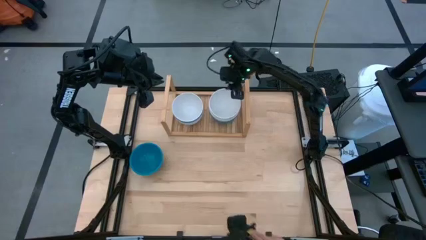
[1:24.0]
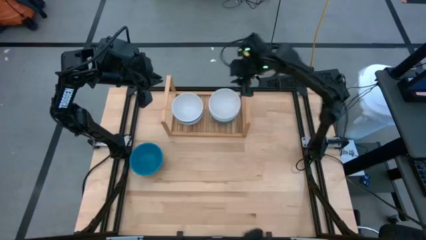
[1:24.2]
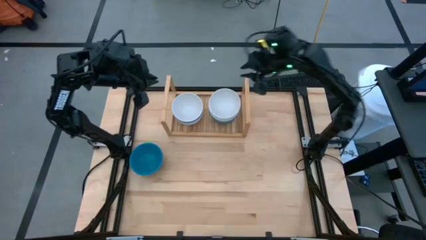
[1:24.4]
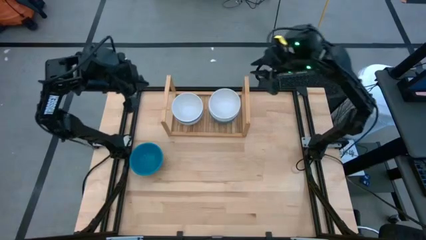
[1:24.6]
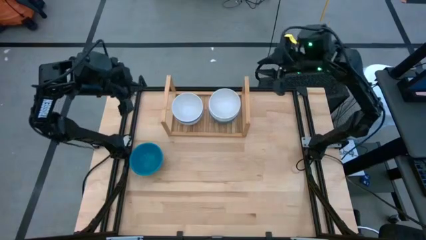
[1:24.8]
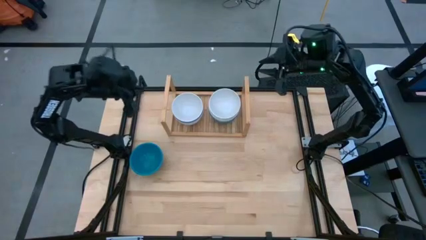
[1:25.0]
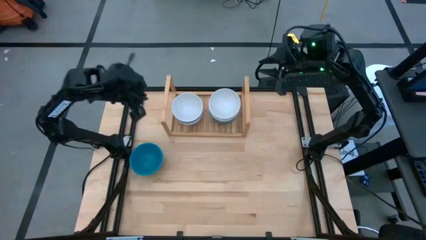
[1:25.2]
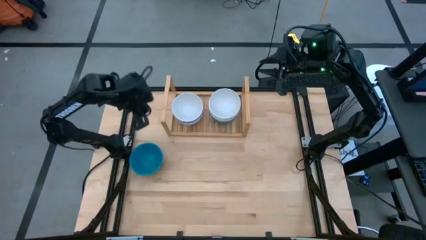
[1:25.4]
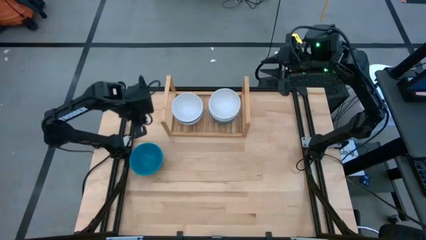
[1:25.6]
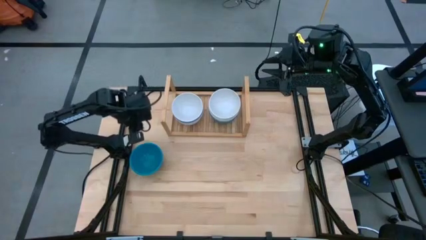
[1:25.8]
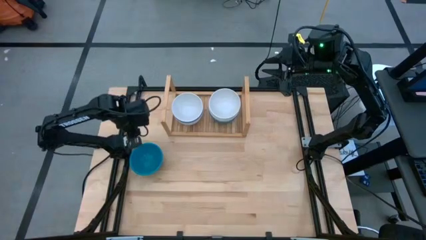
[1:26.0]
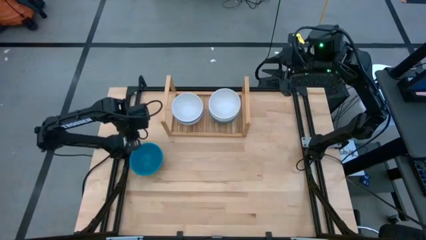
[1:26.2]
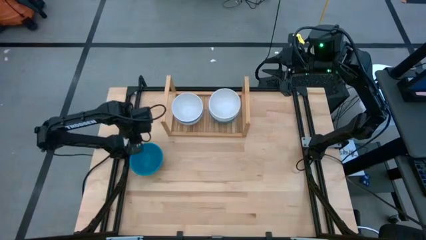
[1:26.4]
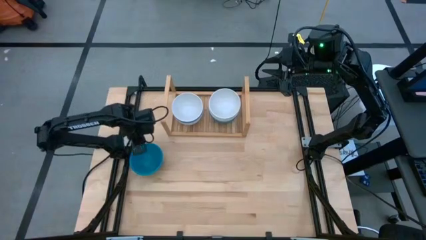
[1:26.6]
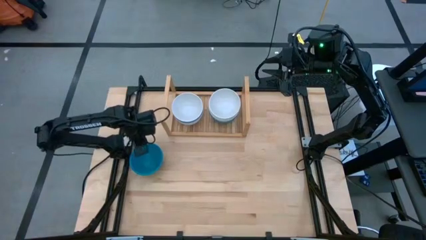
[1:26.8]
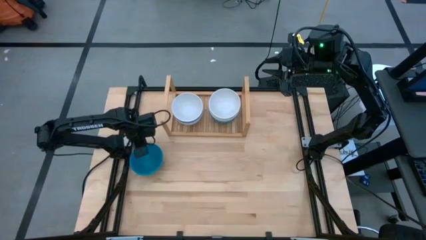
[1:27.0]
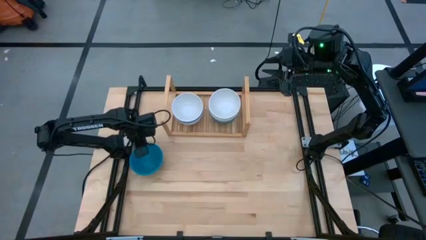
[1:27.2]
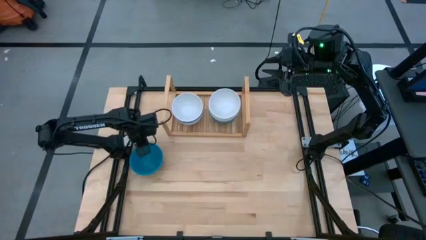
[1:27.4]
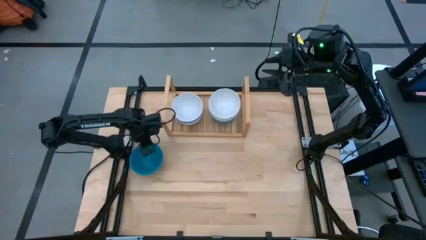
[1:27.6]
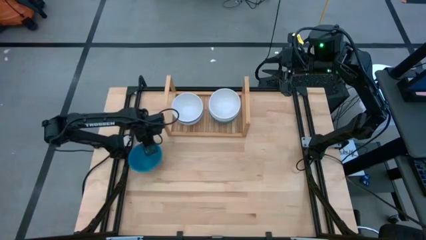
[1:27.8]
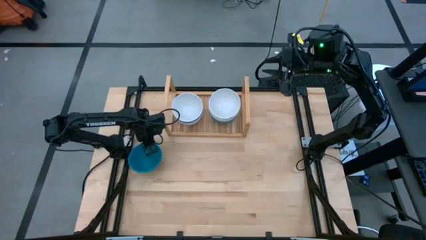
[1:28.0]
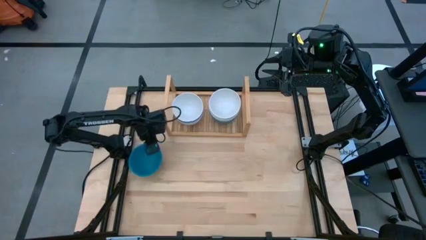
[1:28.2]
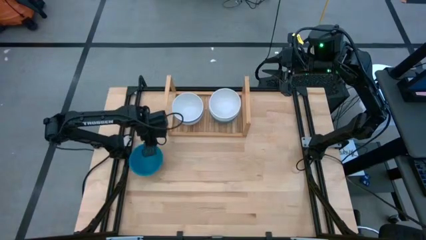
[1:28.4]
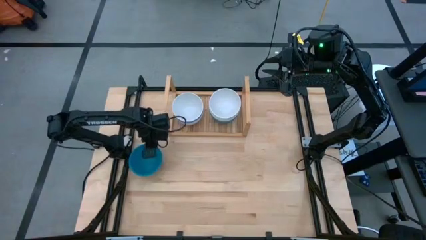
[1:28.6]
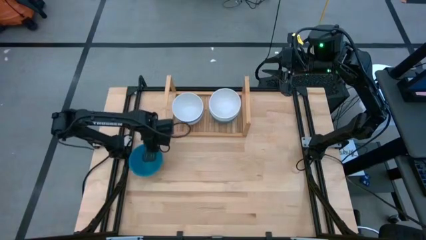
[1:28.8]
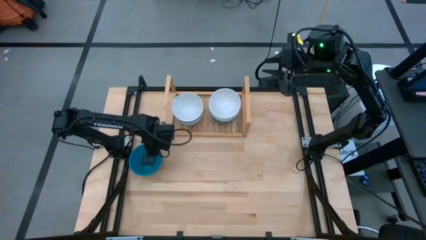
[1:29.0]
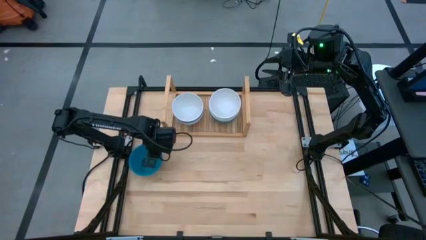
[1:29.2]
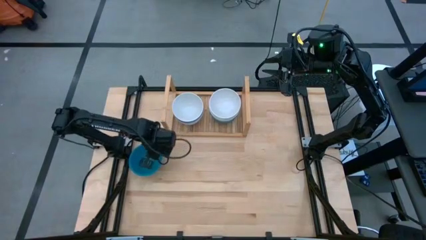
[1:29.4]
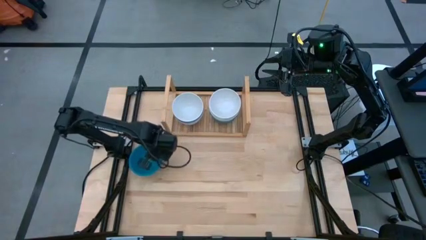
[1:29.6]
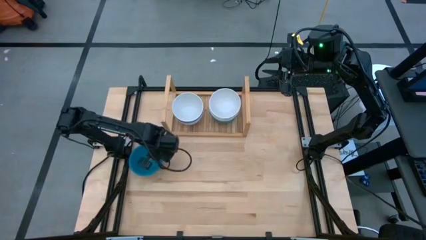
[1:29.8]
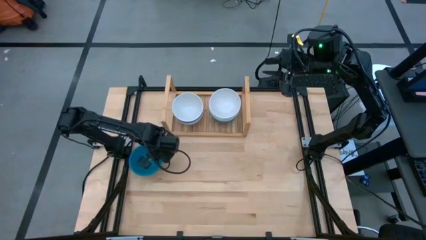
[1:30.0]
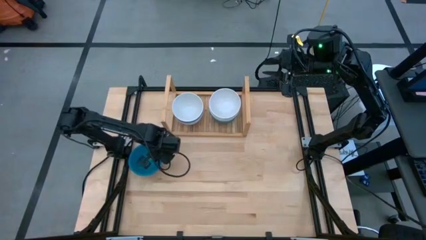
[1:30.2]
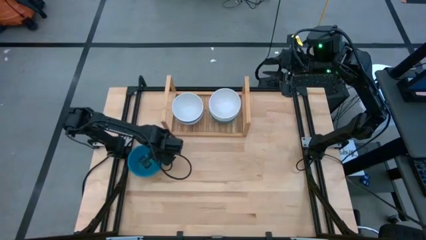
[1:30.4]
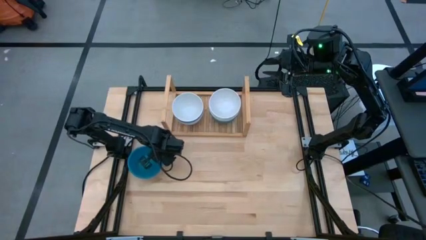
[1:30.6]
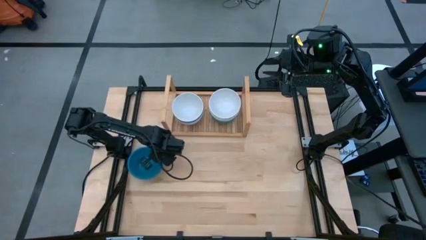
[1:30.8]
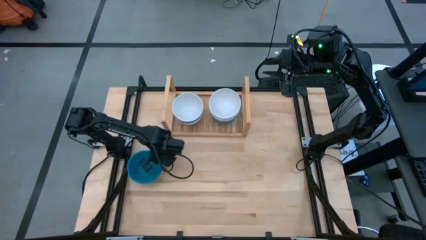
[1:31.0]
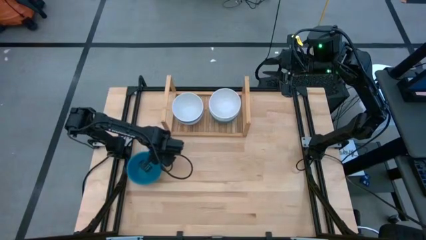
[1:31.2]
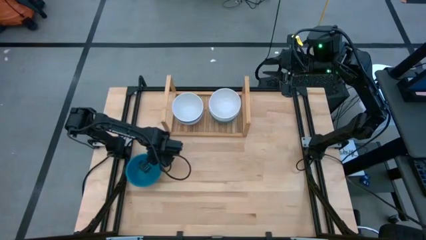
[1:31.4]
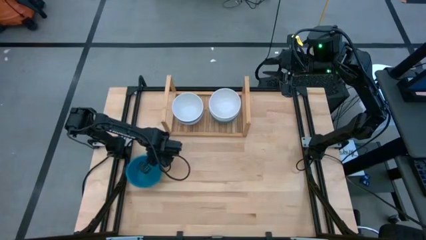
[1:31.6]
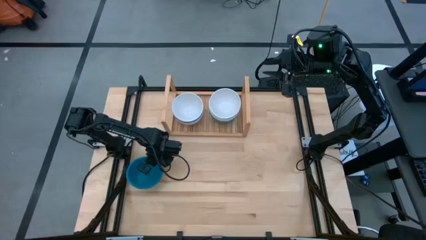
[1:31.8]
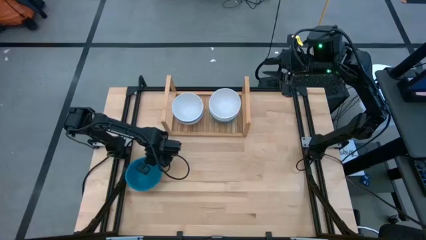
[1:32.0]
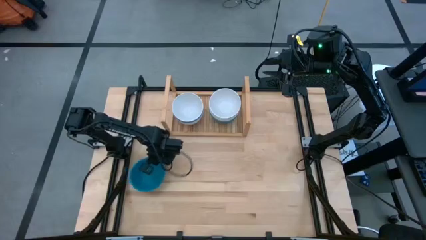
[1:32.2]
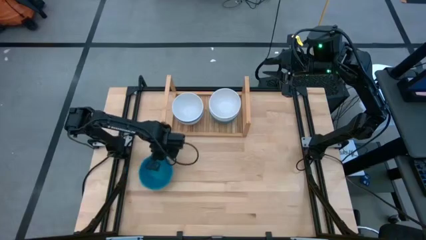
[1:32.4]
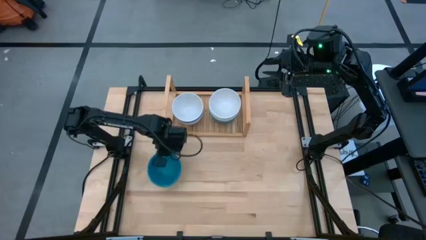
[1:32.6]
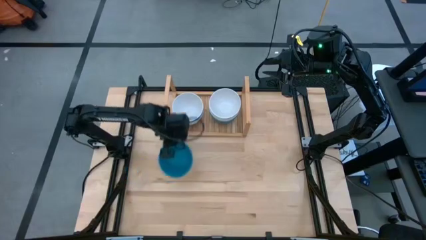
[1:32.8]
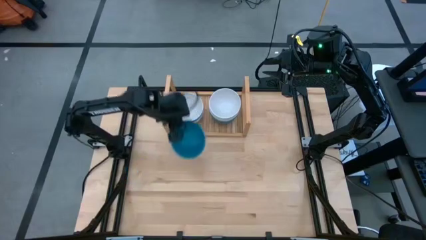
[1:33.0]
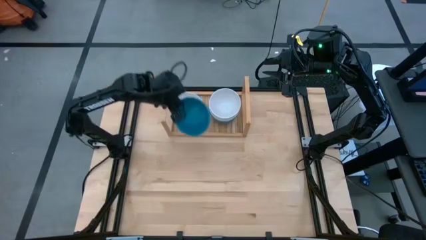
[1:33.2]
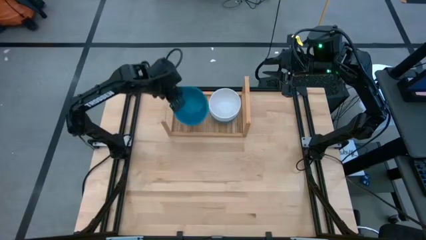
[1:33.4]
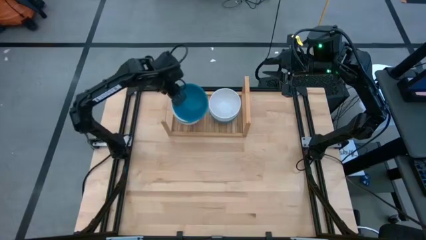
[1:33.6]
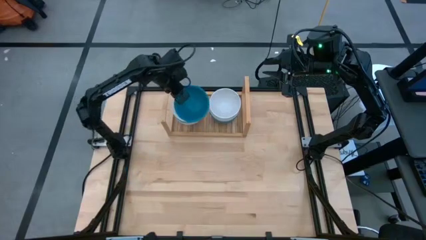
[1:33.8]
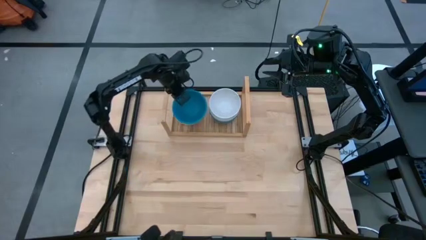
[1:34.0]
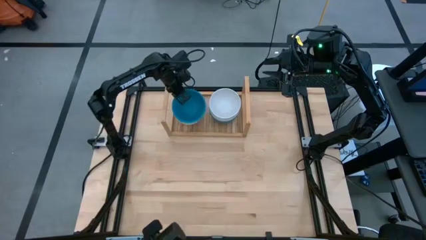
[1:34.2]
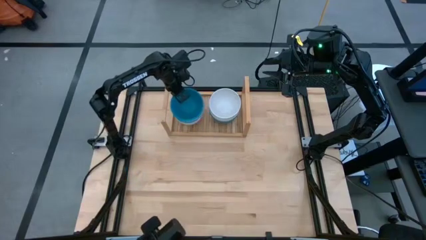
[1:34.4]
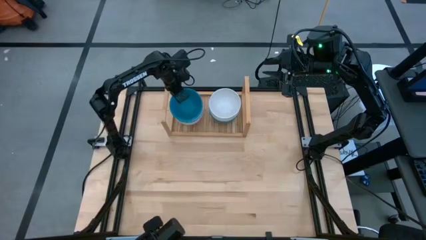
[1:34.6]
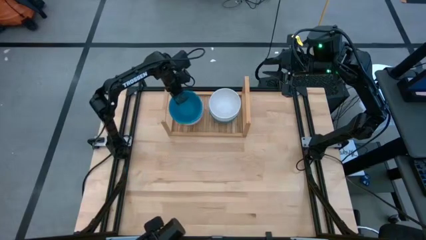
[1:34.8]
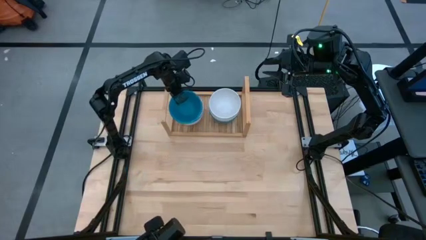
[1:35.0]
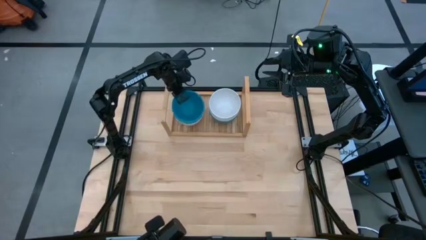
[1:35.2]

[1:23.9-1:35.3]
Task: Place and stack bowls onto a shelf
Stack the blue bowl on the blue bowl on the shelf

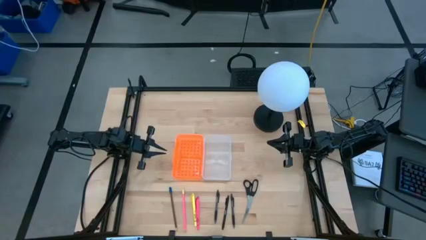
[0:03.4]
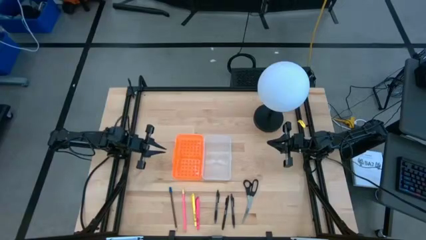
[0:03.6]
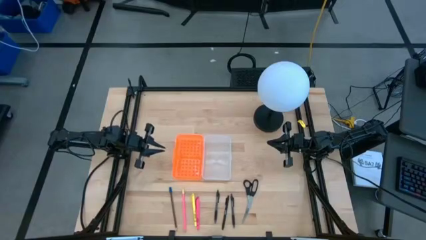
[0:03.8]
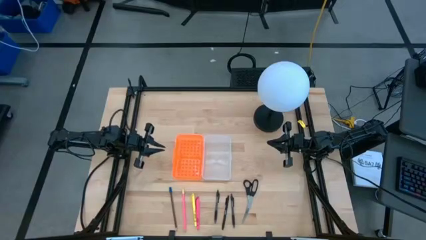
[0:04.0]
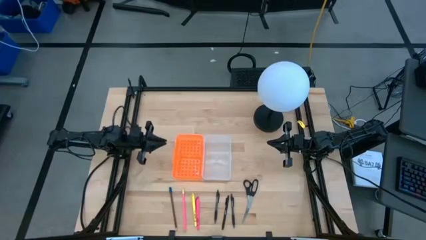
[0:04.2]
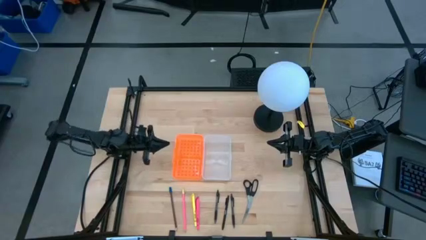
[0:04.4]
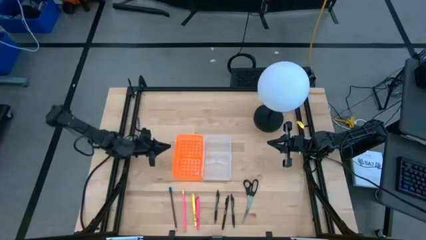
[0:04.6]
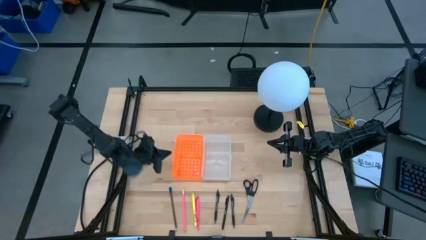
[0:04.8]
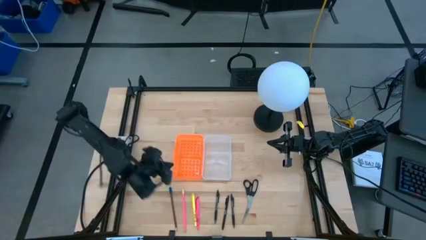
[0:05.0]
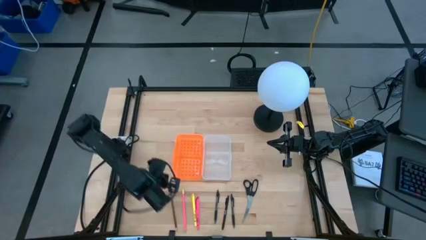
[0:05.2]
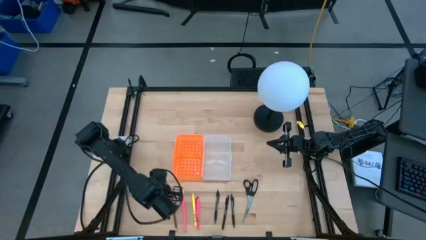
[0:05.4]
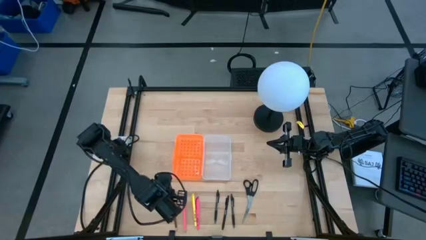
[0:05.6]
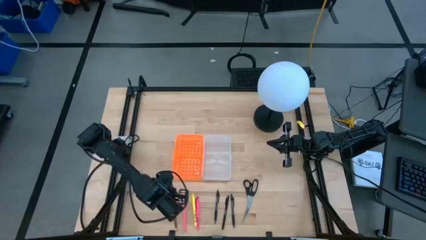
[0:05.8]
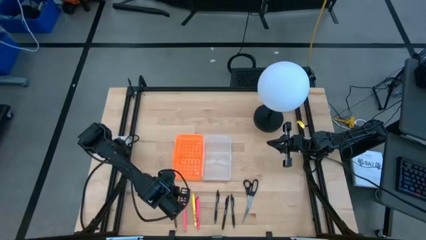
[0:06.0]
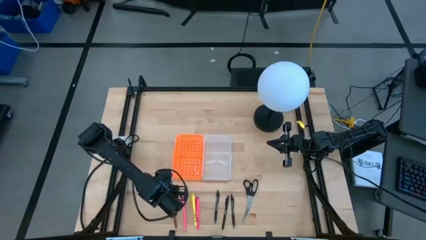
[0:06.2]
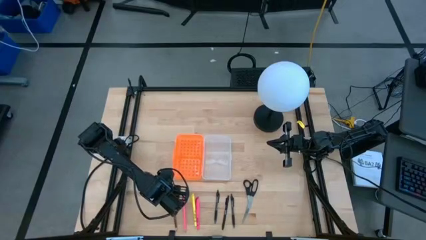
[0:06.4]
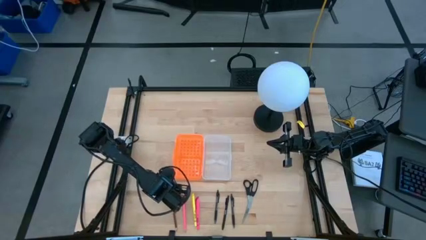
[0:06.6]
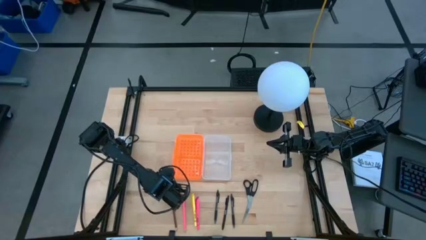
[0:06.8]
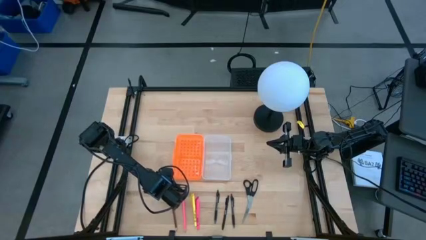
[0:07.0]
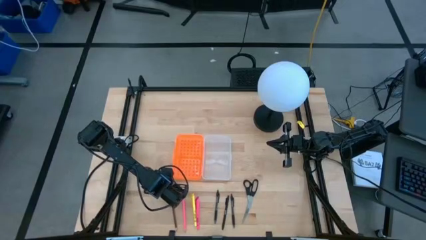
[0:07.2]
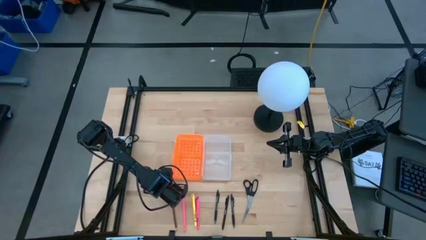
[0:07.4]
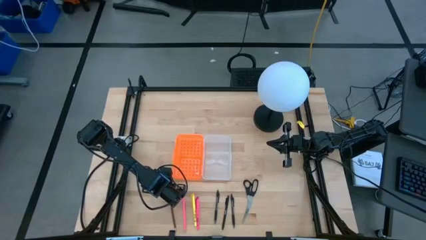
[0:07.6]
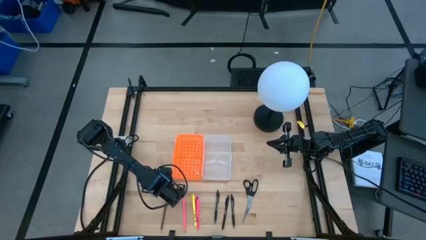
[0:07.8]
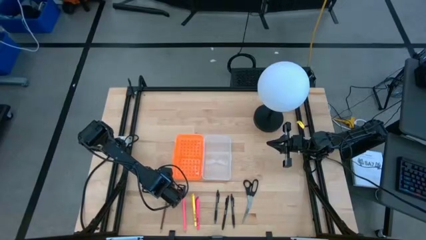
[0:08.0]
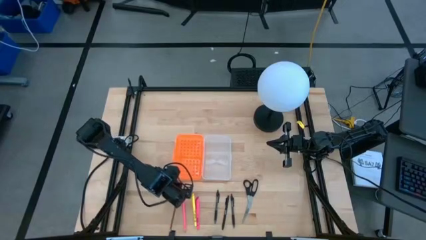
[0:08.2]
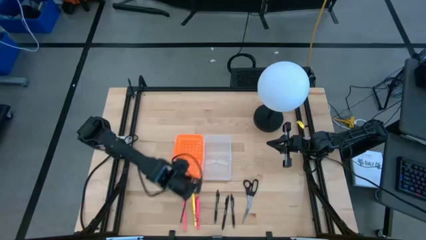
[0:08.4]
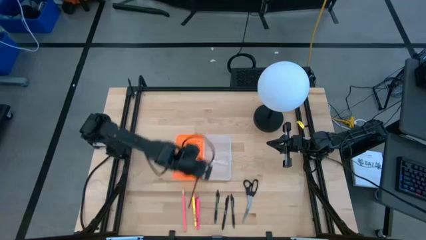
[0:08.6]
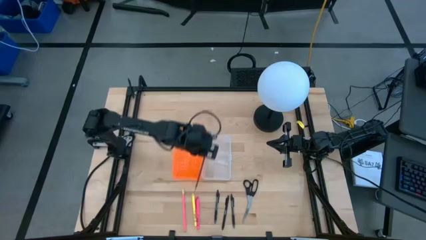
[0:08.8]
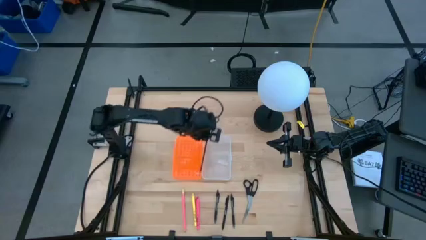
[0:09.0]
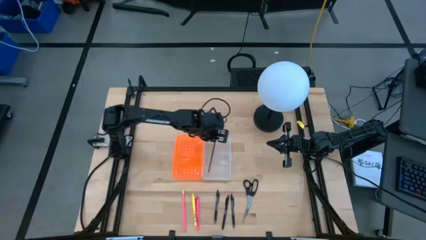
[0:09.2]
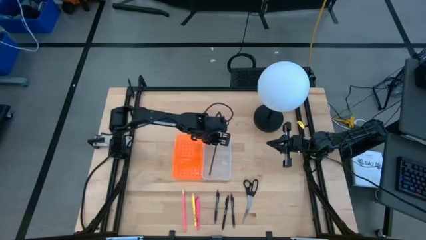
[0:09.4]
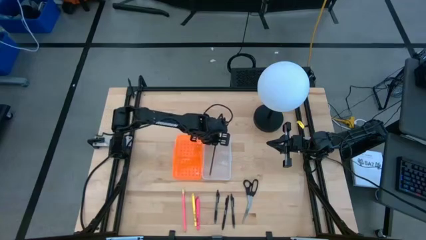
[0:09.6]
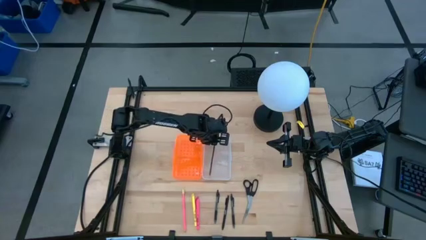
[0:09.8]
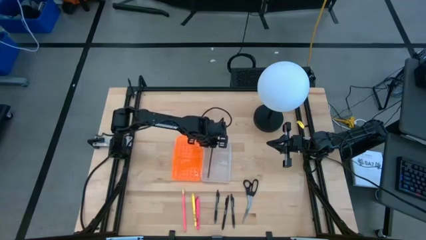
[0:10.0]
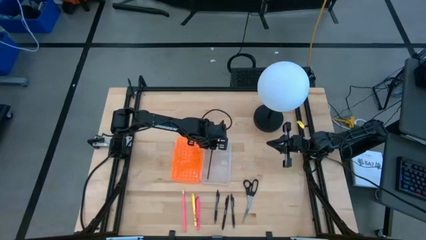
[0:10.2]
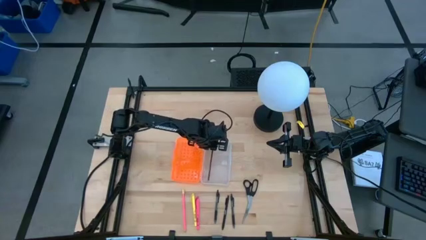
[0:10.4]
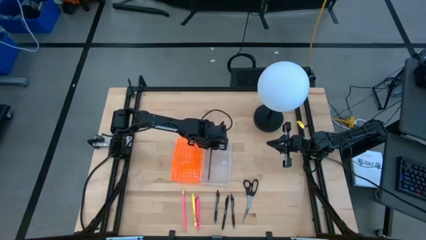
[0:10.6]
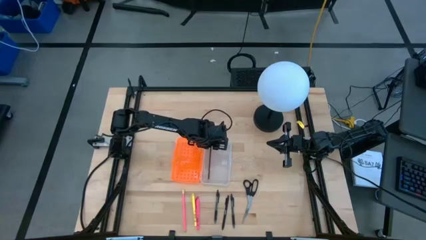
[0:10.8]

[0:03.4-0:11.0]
Task: Pick & place school supplies into a supply box
Put the brown pencil into the supply box
